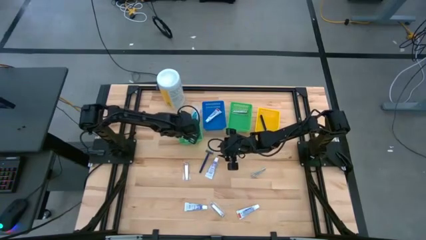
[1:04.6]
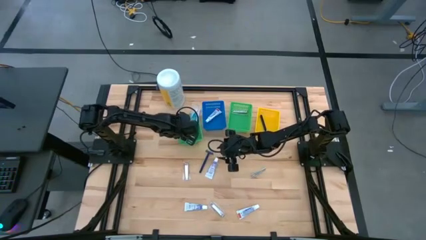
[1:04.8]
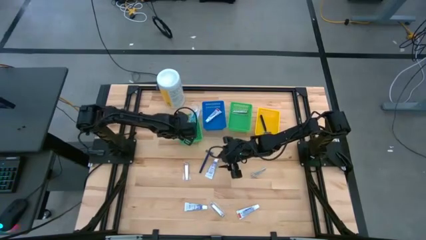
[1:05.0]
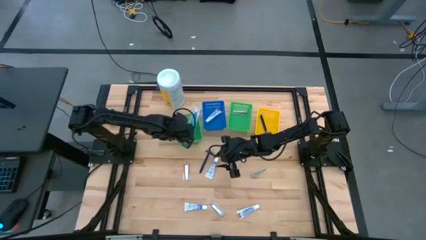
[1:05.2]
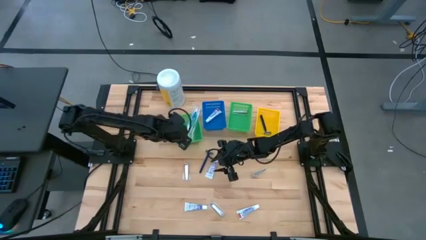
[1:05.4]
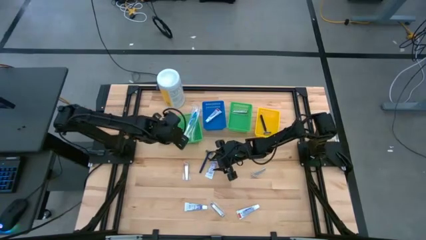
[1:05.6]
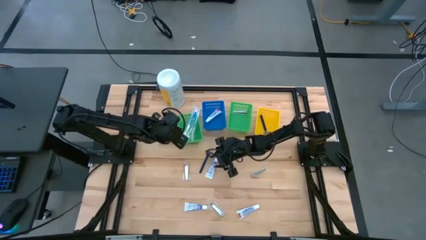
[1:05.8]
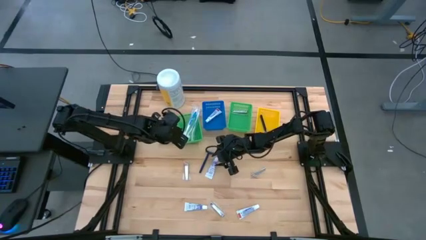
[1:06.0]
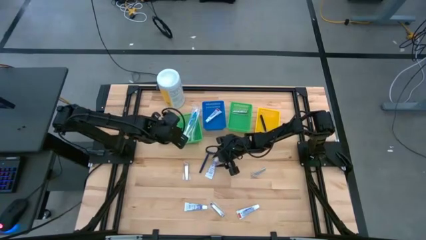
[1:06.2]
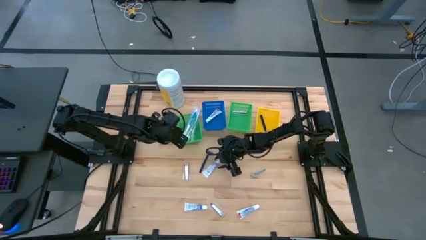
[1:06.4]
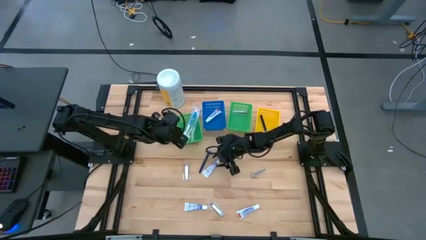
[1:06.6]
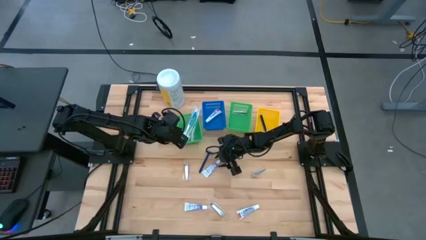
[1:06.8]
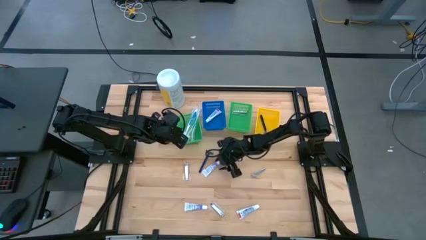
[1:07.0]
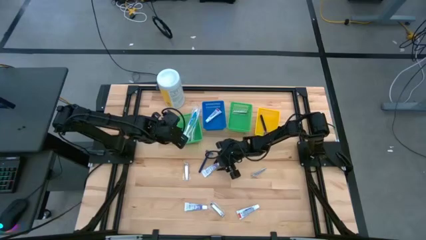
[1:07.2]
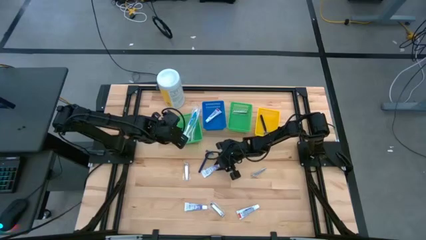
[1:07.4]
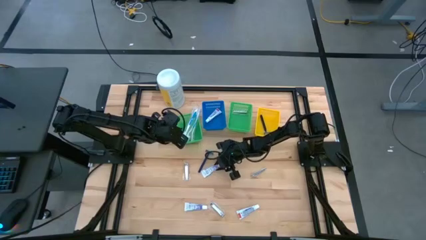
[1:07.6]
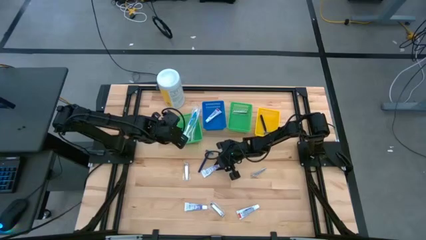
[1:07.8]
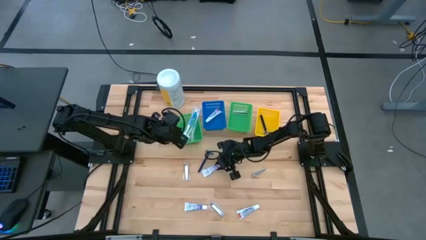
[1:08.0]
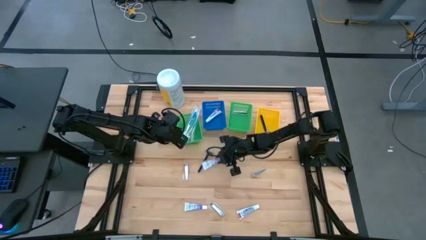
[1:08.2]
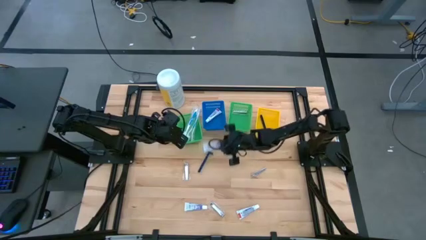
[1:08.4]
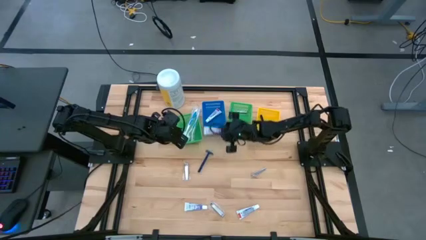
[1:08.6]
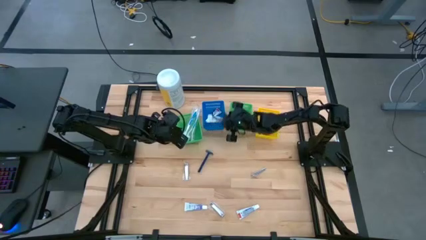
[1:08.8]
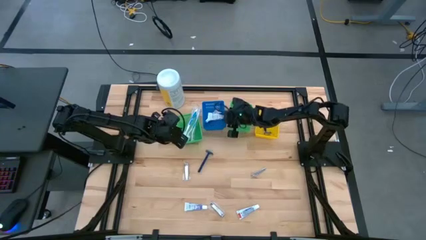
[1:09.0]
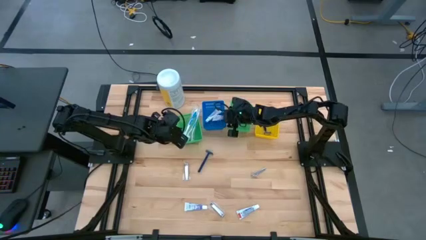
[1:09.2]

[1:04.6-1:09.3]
Task: Pick & Place Travel size toiletries
Put the white toothpaste into the blue basket

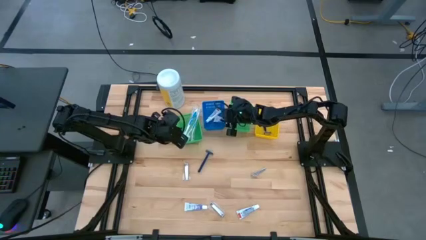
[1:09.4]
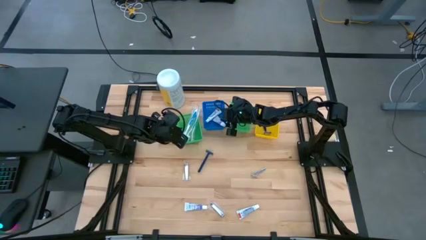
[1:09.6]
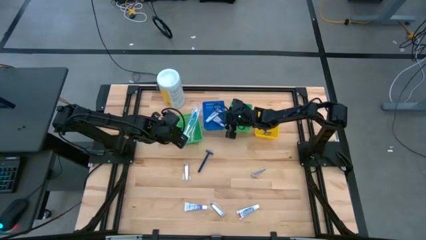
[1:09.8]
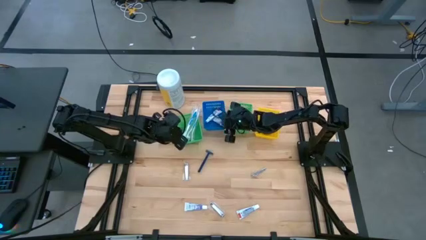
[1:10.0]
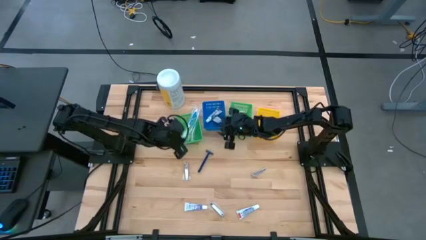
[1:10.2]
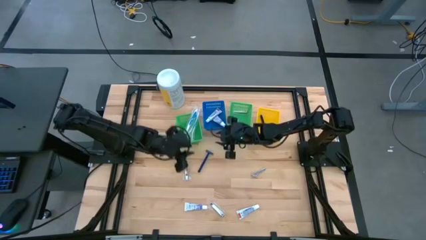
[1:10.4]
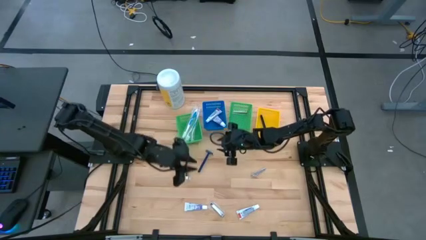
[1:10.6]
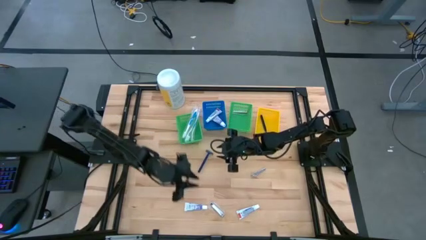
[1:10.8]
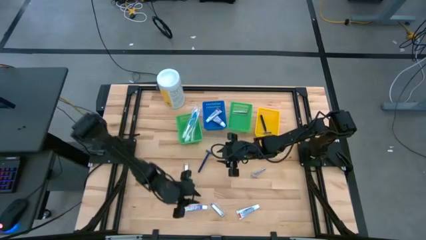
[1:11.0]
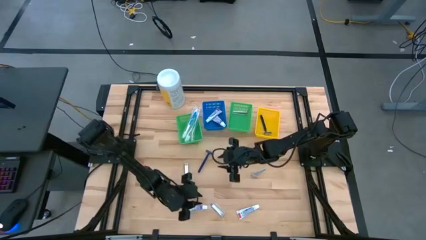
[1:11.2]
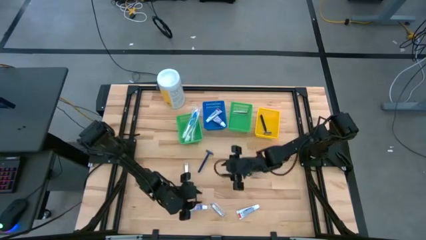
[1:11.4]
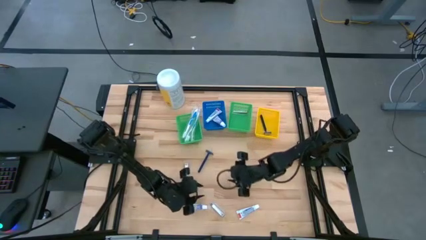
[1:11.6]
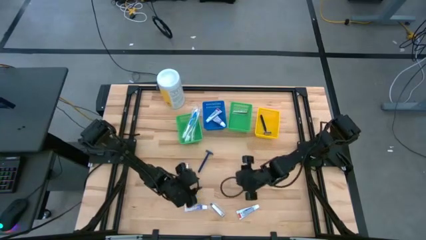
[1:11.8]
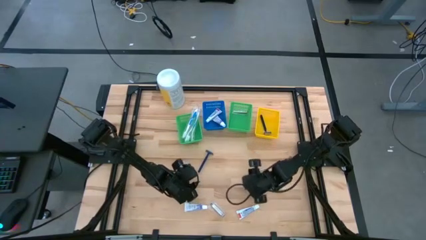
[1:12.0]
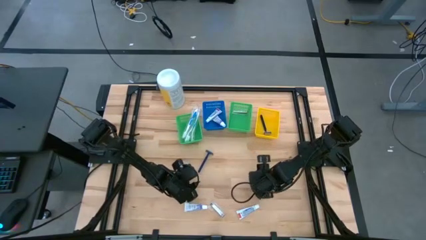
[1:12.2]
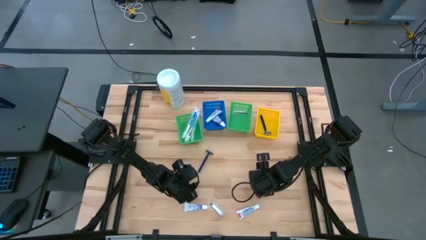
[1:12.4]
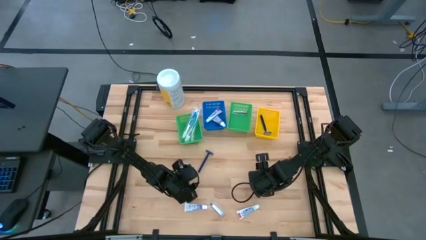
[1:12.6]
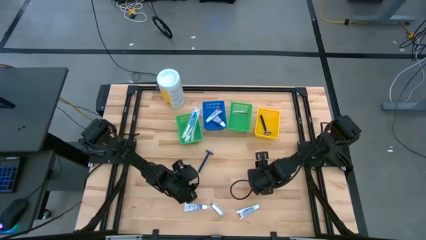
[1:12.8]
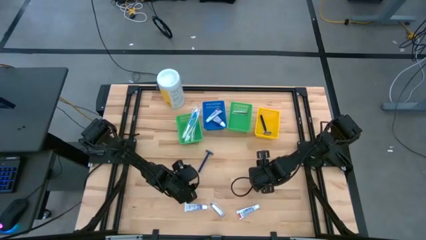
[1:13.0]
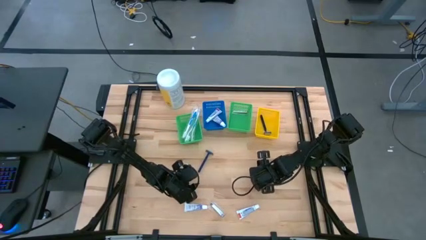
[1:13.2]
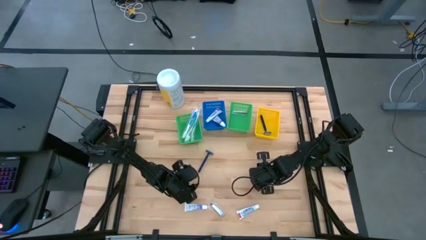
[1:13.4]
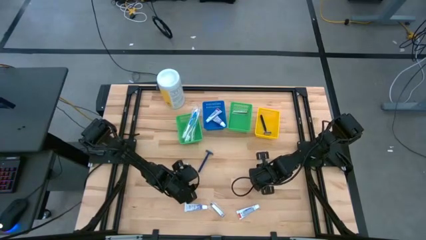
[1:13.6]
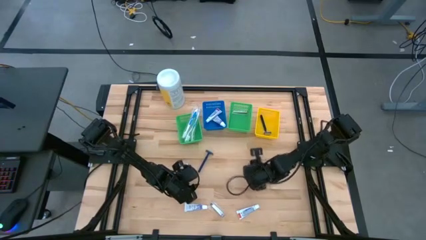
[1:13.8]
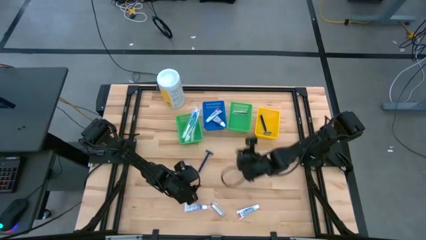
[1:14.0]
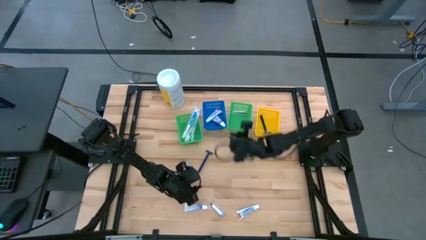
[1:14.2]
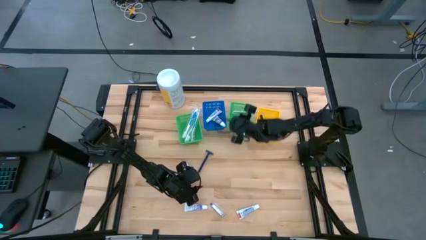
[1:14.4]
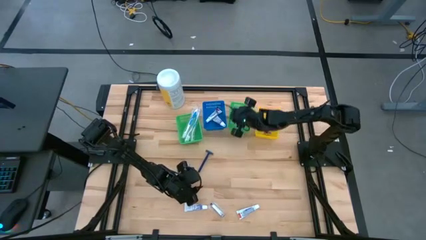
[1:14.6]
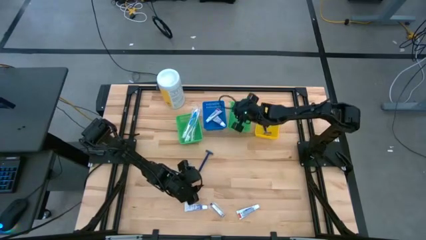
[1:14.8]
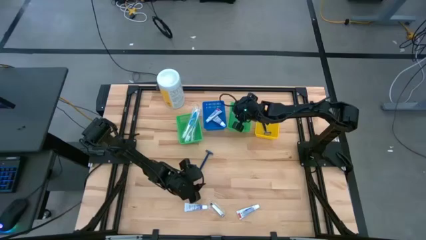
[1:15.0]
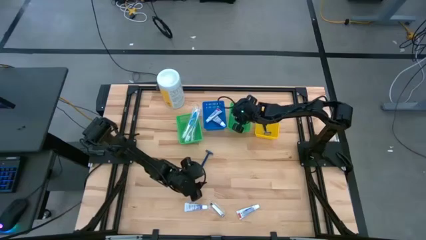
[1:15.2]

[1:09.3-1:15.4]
Put the silver nail cutter into the right green basket
